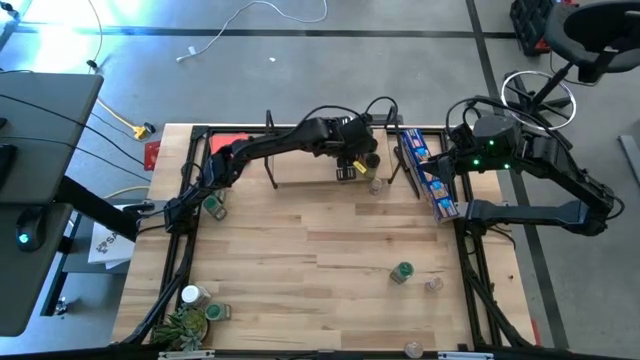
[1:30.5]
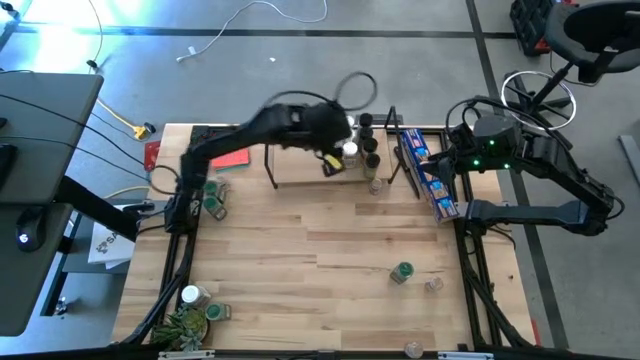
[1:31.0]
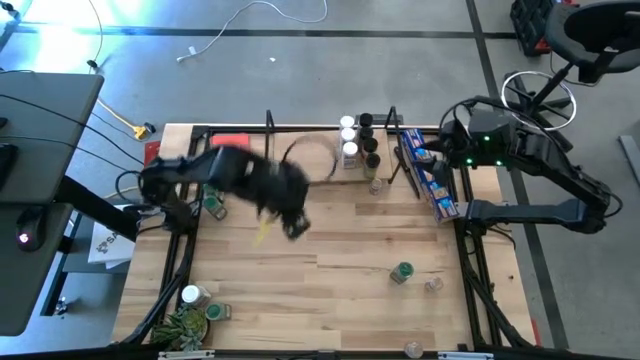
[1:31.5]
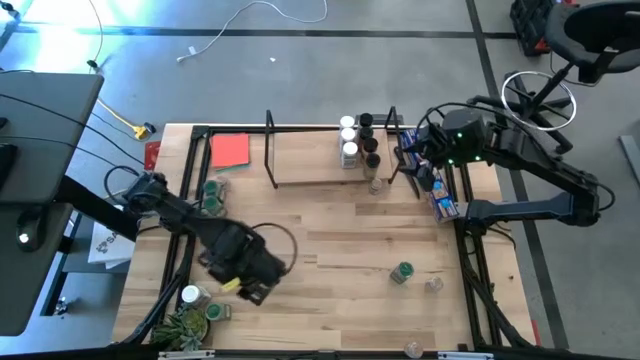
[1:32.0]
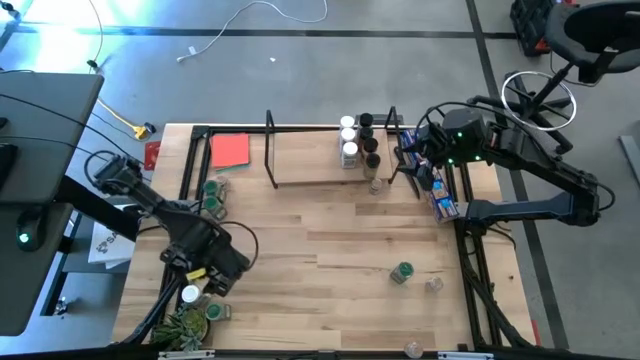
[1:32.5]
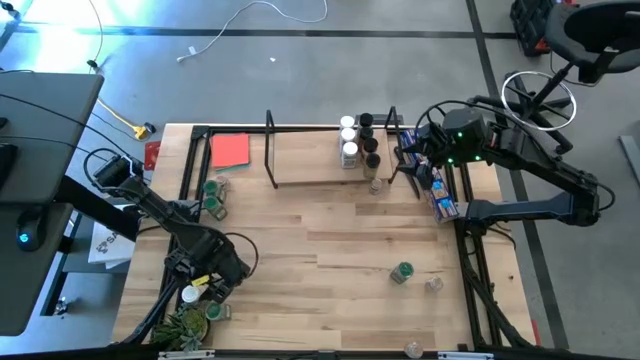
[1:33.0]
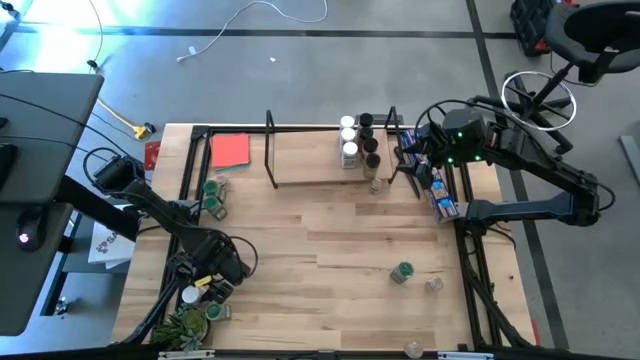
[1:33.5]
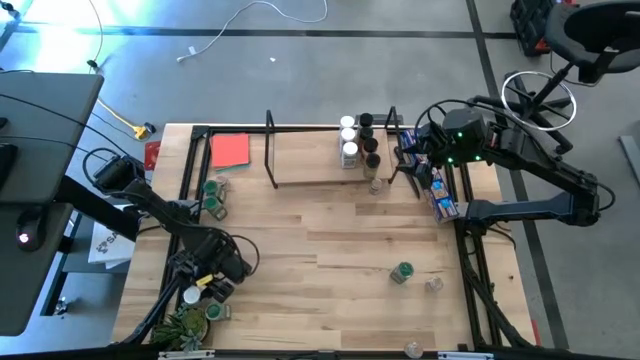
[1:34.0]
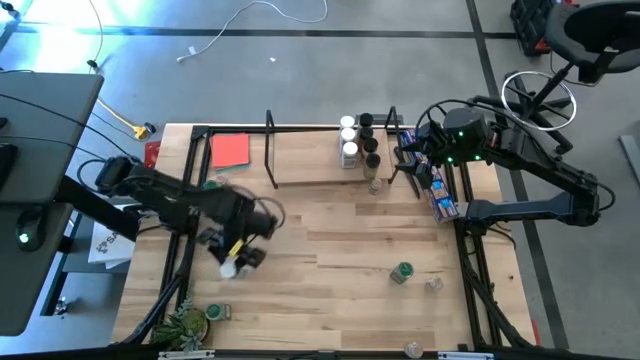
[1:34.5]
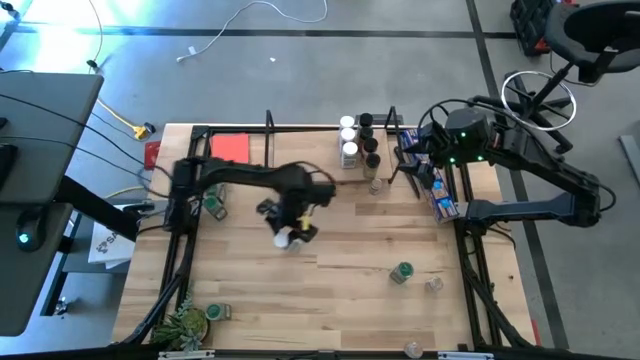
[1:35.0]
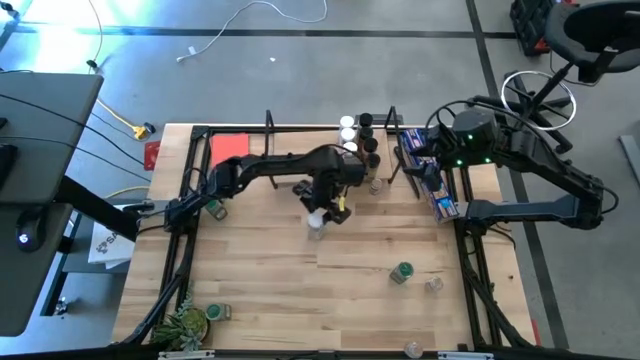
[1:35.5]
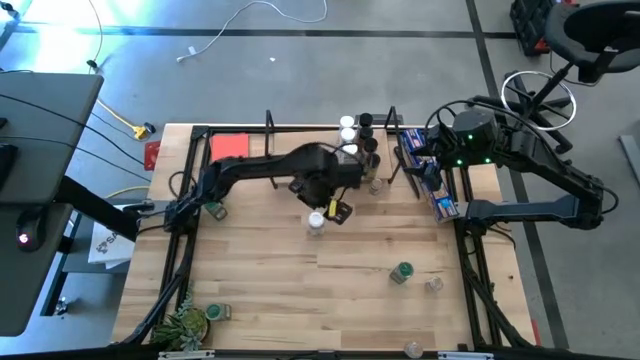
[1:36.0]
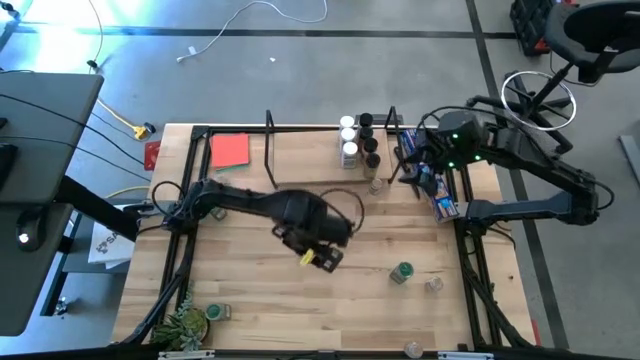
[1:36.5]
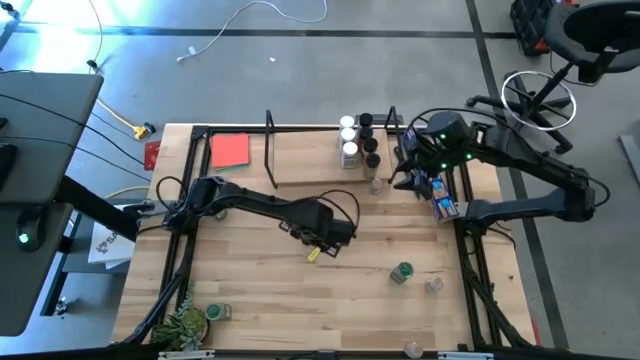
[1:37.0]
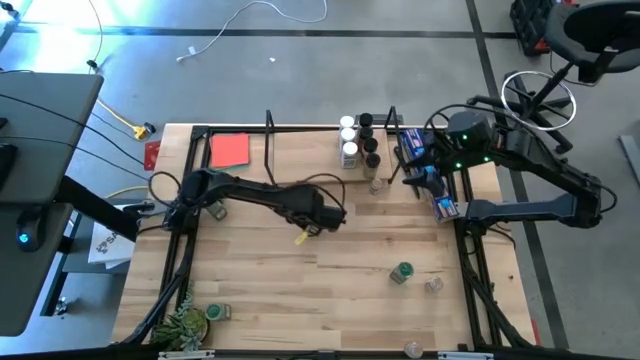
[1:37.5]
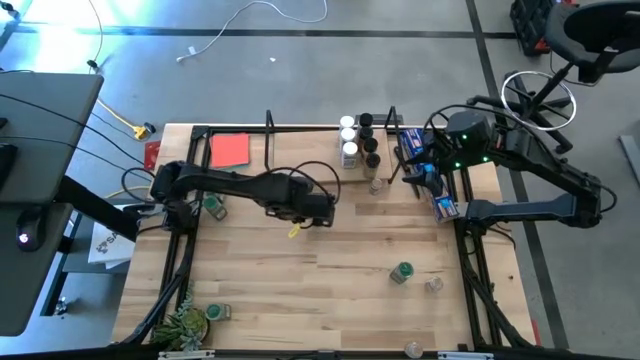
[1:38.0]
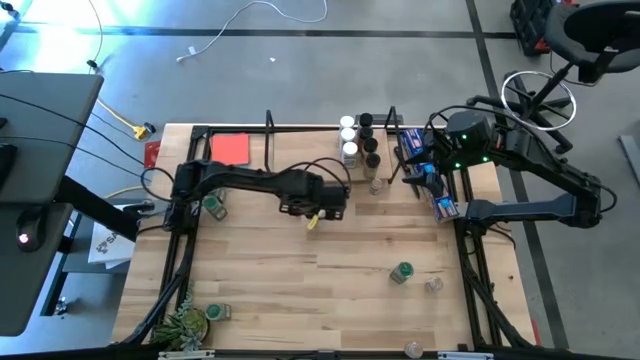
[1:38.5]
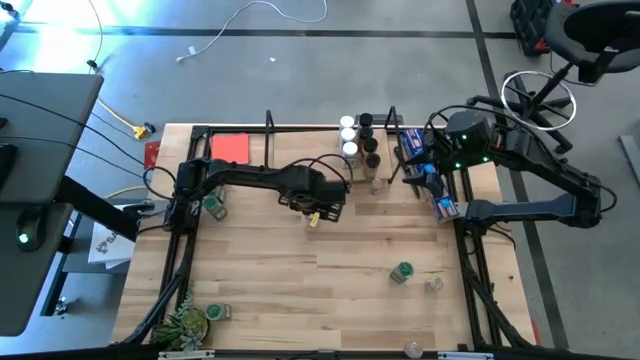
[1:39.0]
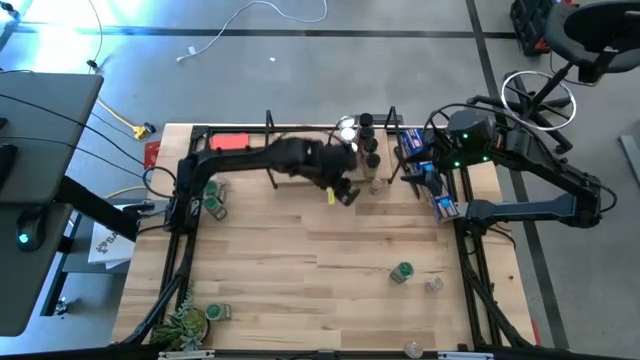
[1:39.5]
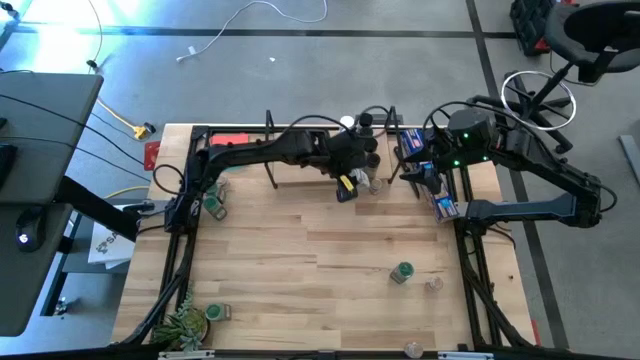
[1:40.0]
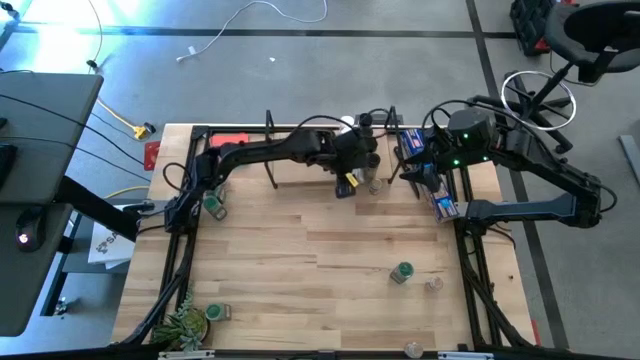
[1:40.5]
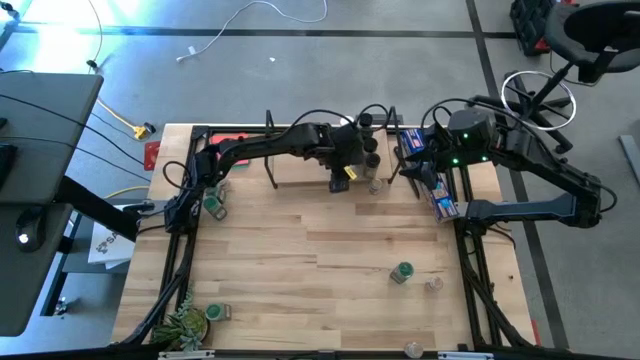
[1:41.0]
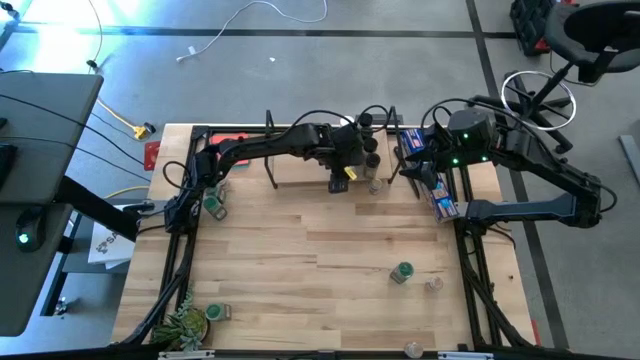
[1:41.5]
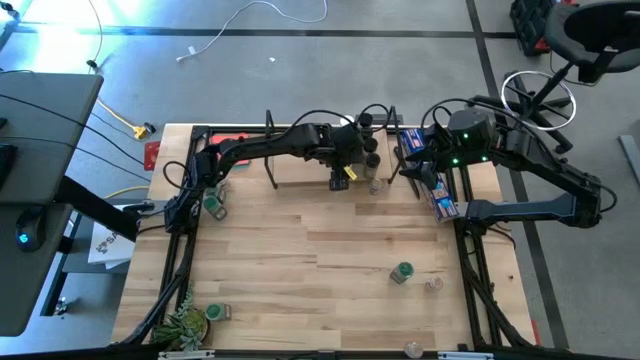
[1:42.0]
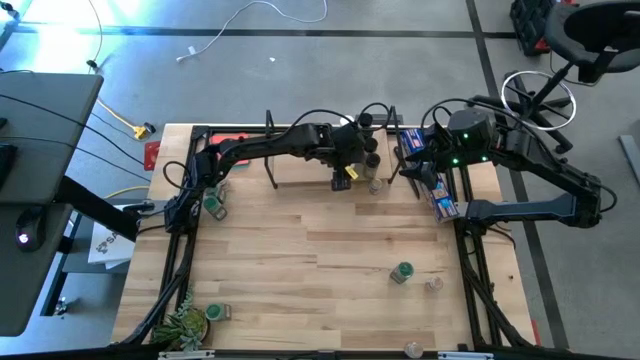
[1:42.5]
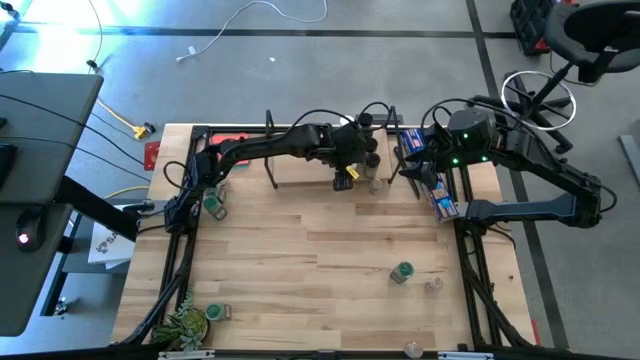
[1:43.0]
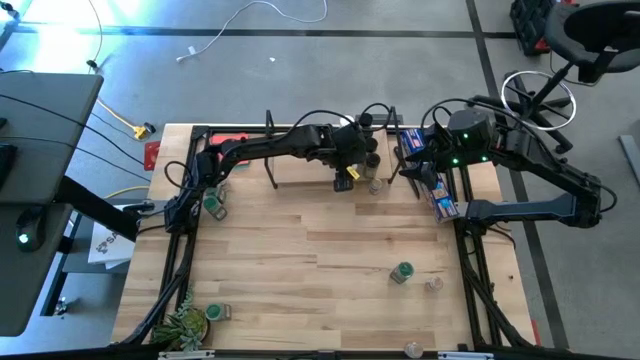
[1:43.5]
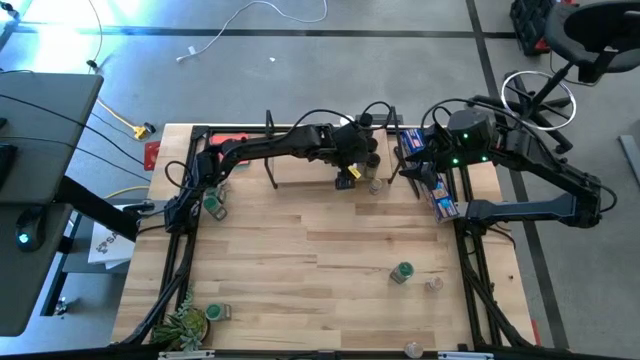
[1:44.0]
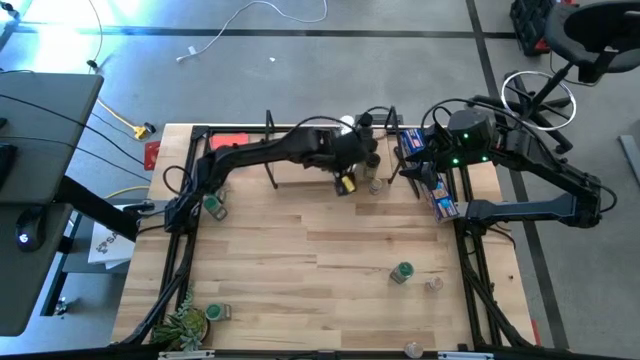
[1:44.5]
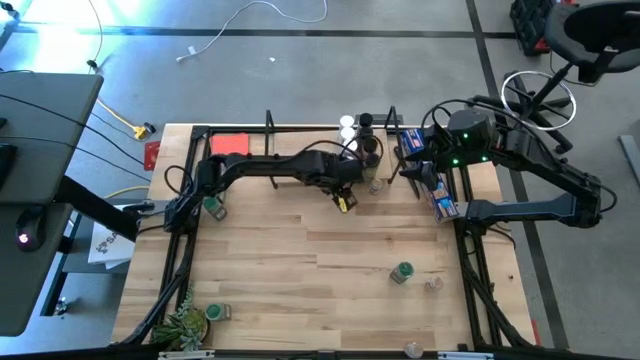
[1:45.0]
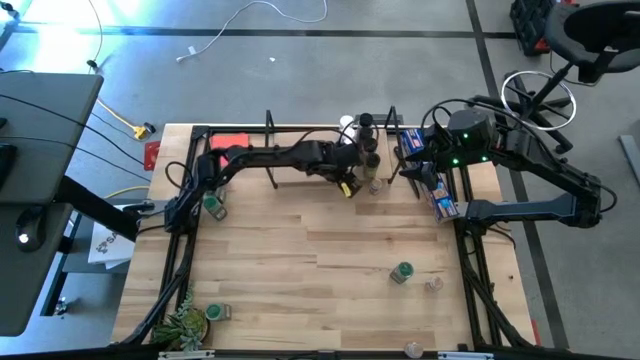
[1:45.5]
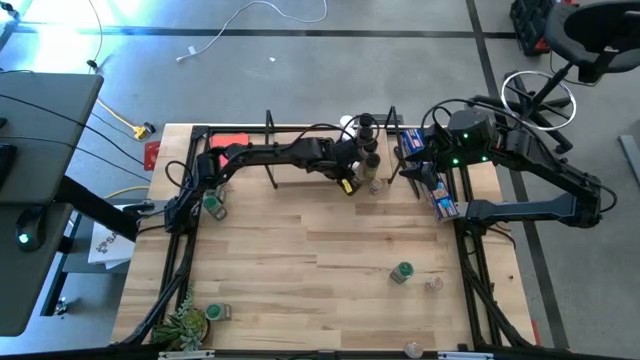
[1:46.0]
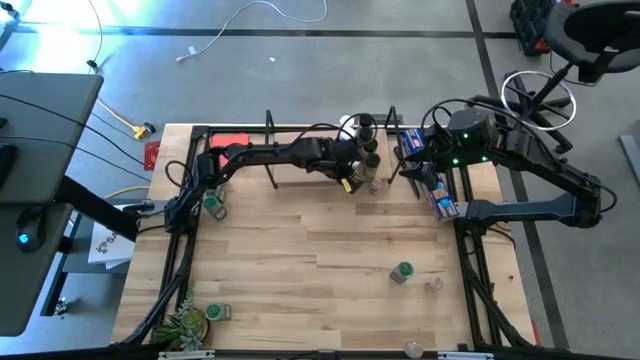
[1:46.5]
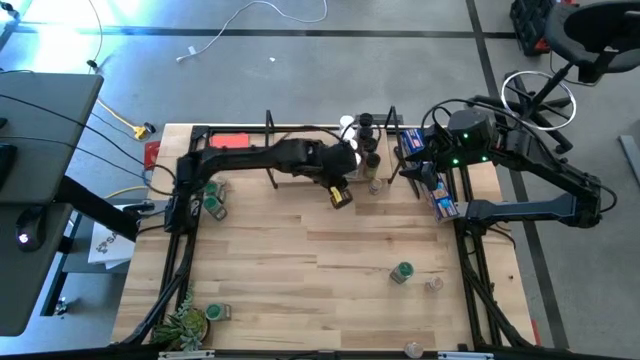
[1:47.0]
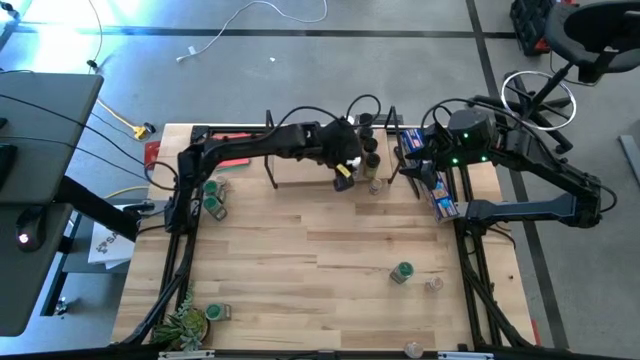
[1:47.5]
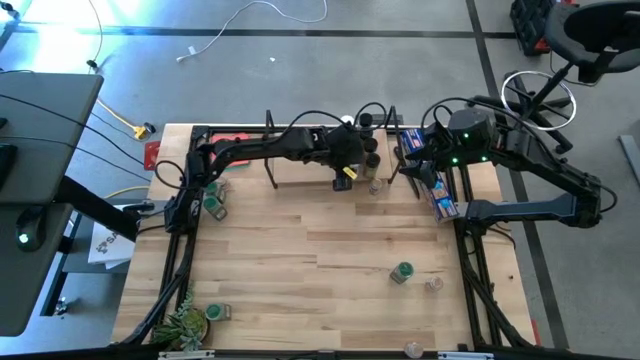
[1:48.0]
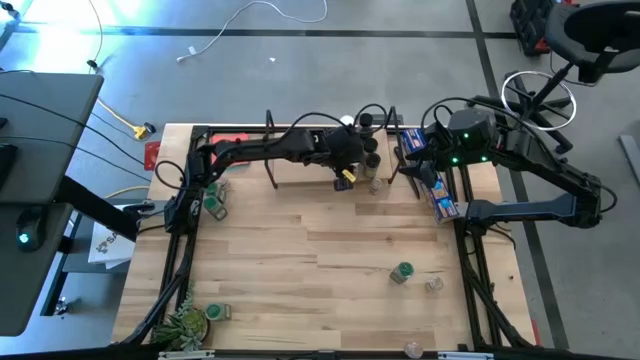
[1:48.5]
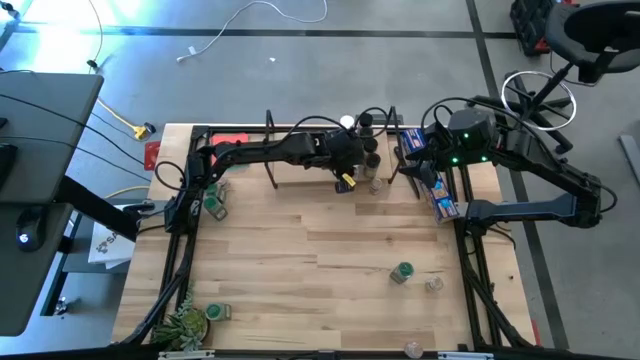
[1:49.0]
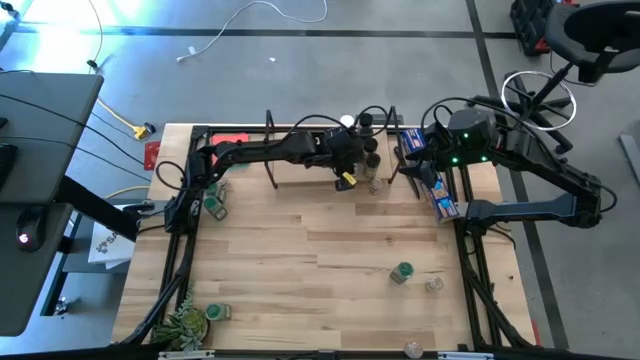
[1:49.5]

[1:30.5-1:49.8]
Task: Shelf spices
Put the white seasoning bottle on the shelf aligned with the other white seasoning bottles

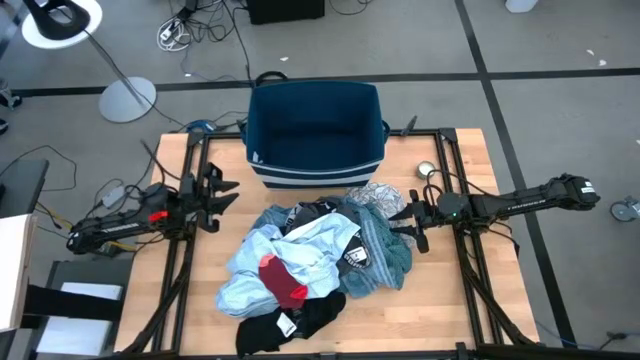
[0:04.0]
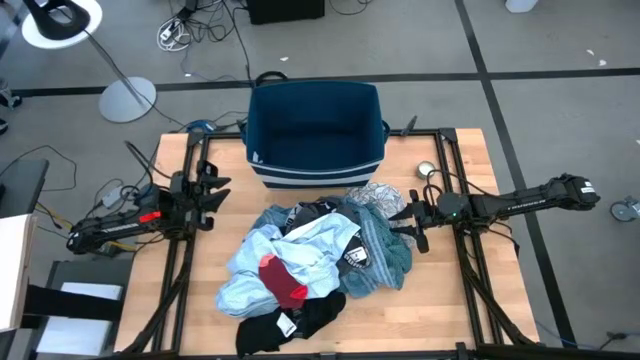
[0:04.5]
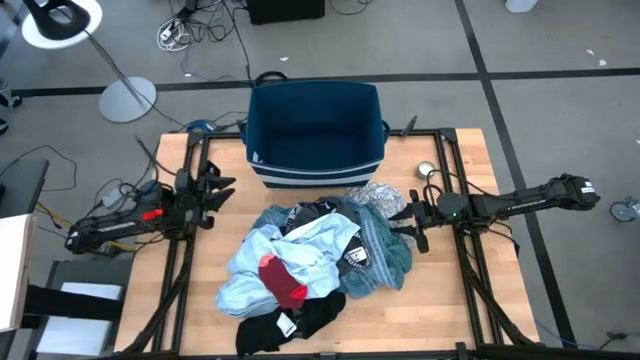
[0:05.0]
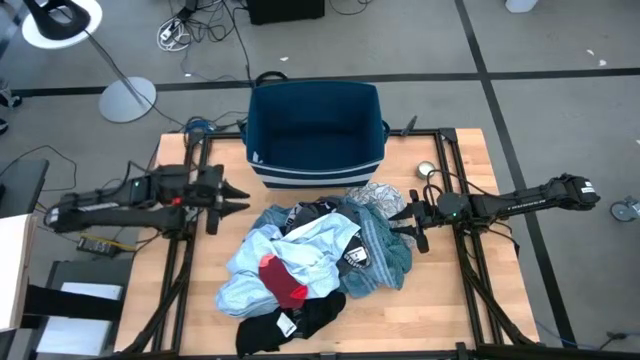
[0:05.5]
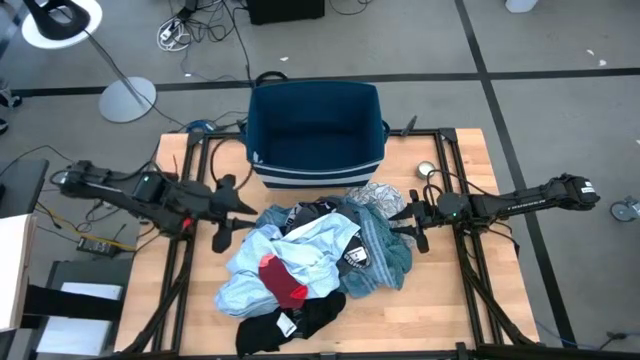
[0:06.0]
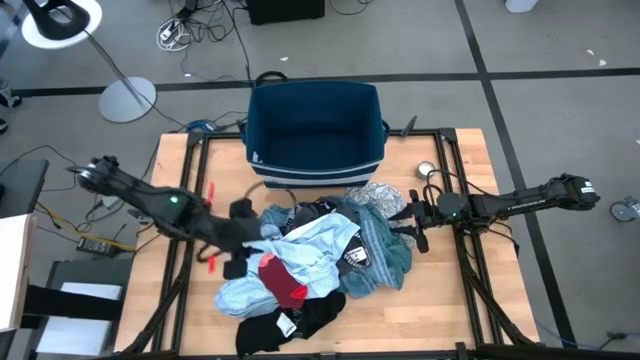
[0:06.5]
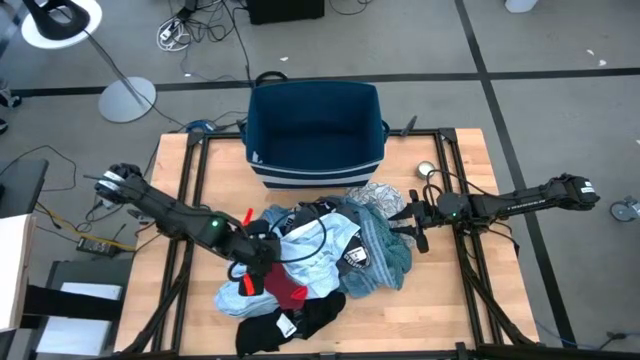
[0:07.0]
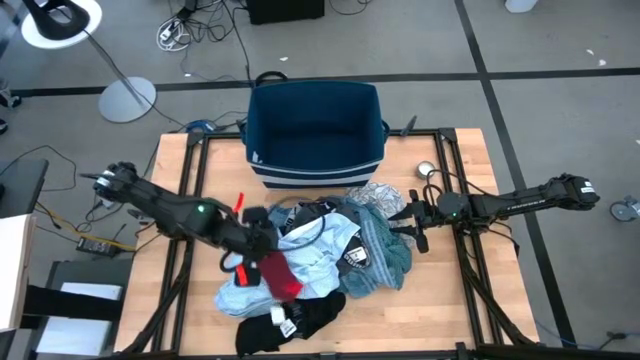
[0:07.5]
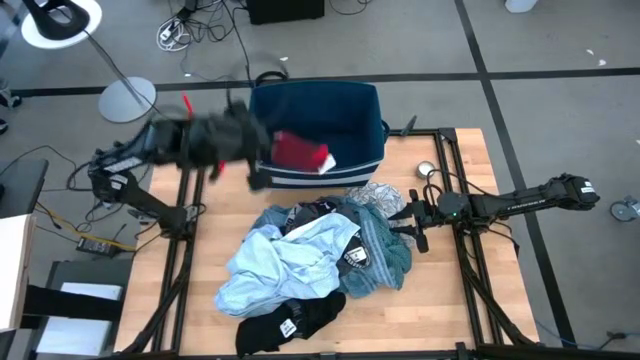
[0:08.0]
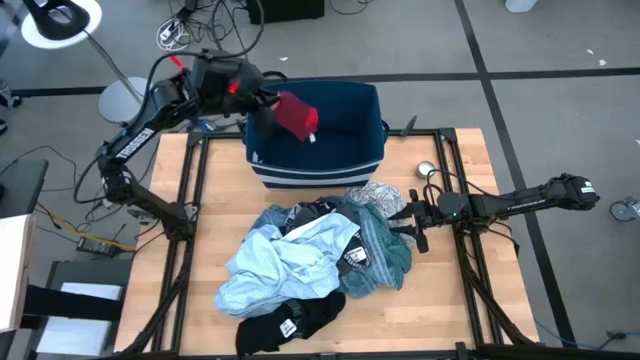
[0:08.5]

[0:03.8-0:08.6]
Task: Sort clothes
Put the red sock into the blue laundry organizer
